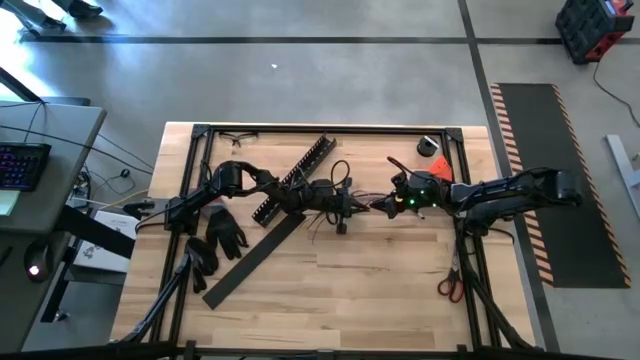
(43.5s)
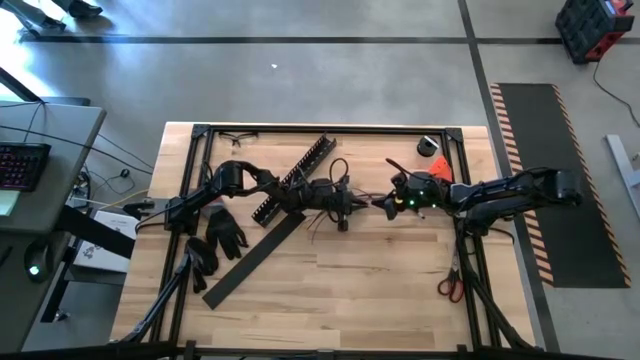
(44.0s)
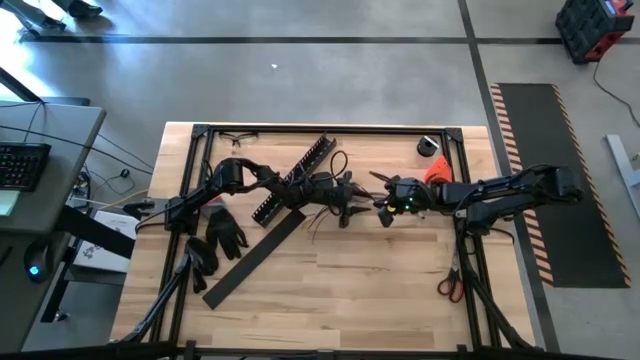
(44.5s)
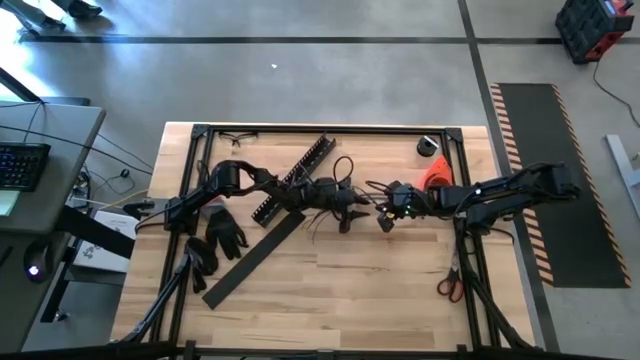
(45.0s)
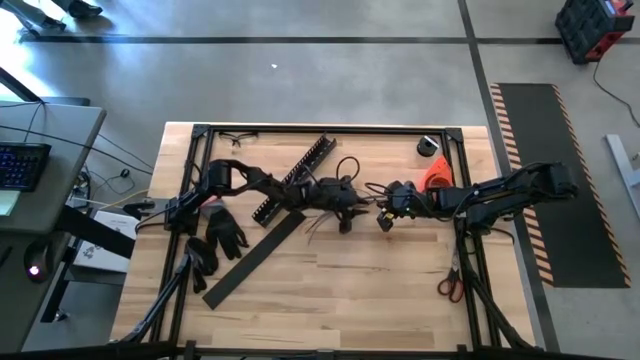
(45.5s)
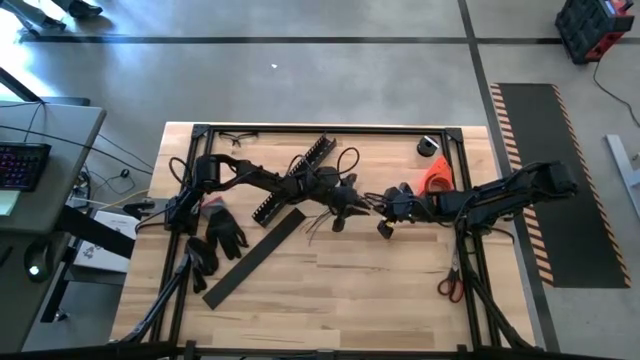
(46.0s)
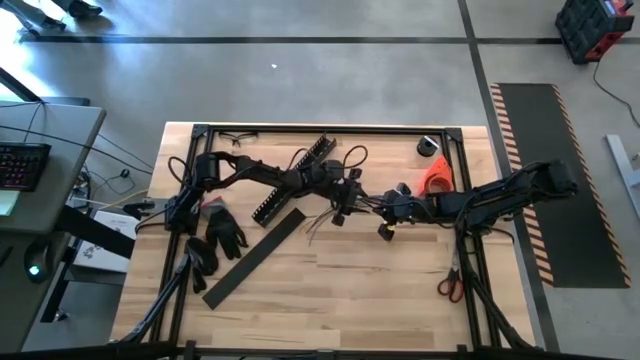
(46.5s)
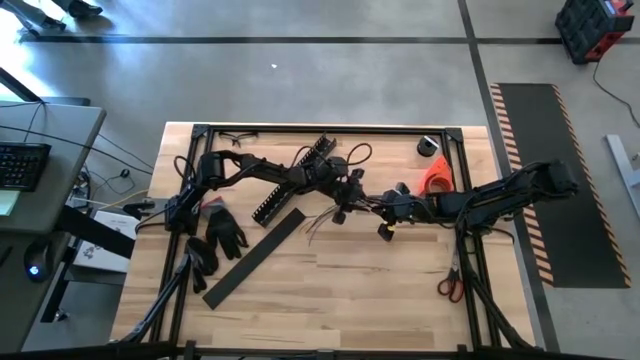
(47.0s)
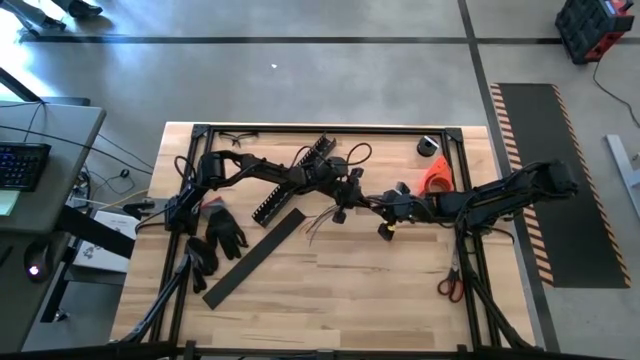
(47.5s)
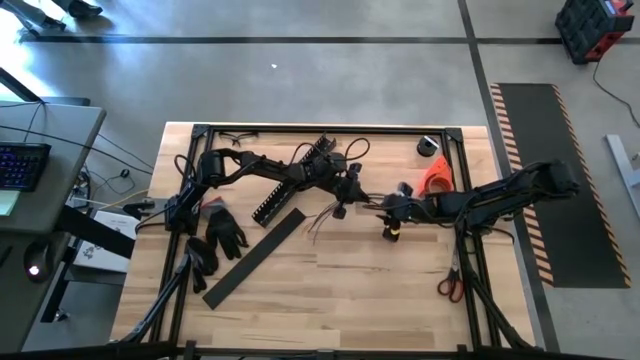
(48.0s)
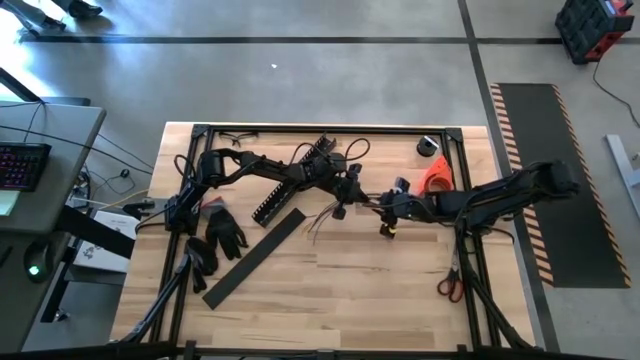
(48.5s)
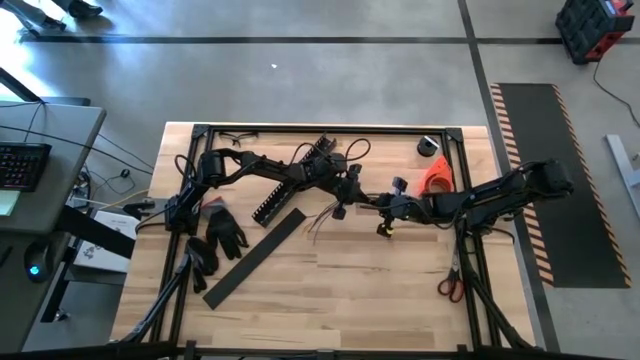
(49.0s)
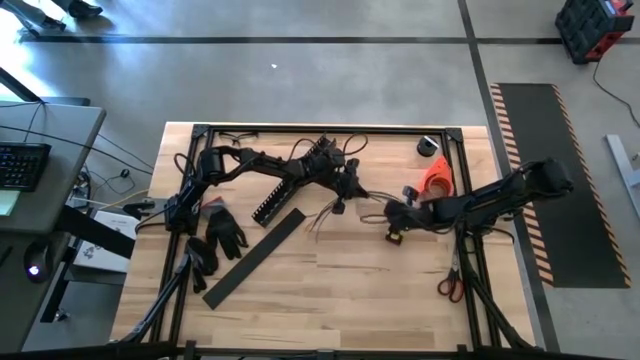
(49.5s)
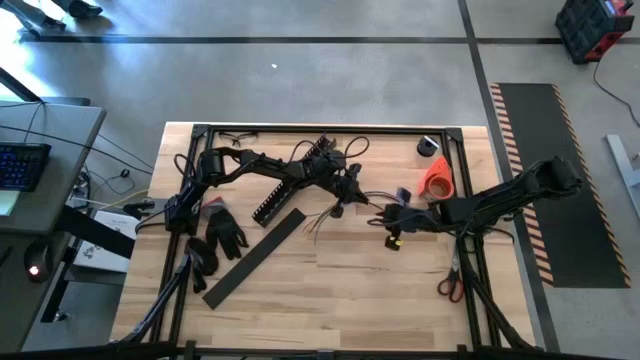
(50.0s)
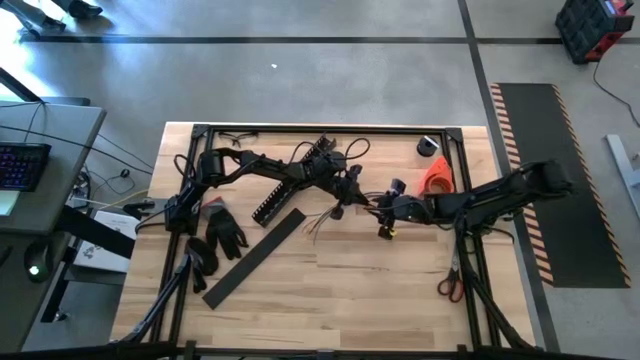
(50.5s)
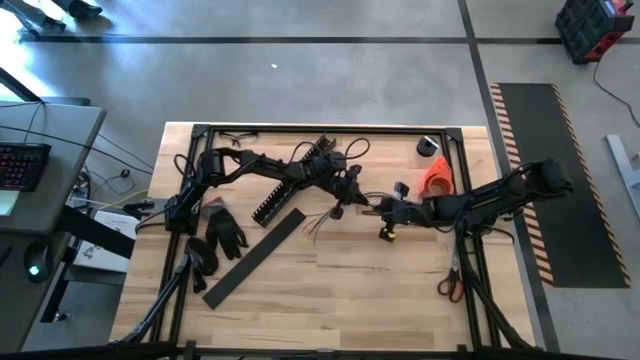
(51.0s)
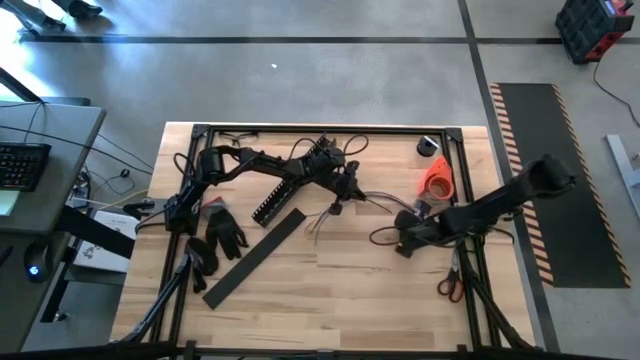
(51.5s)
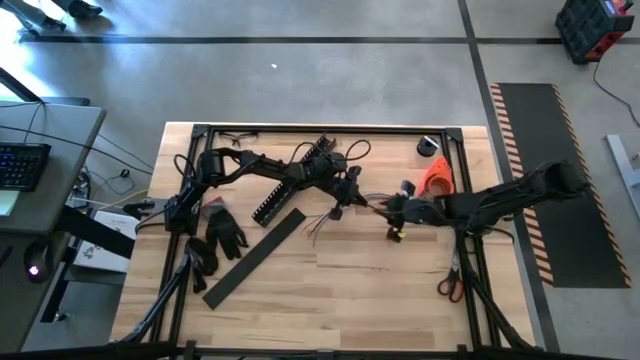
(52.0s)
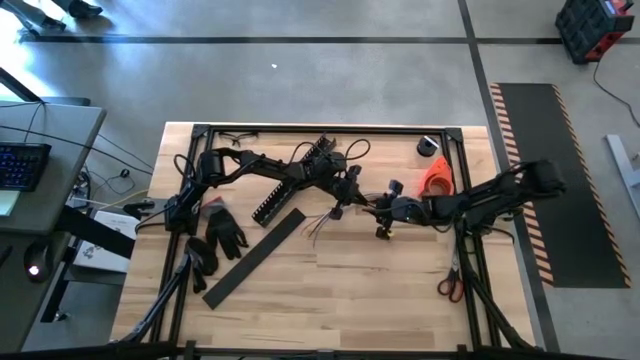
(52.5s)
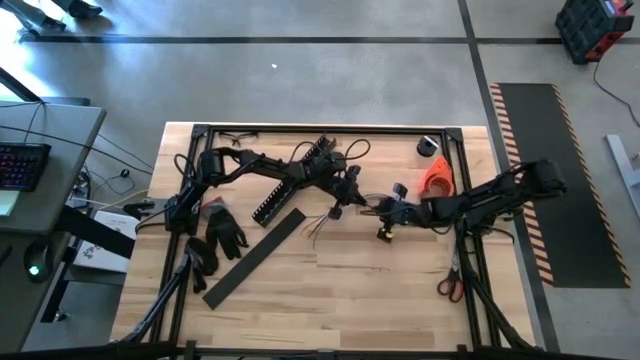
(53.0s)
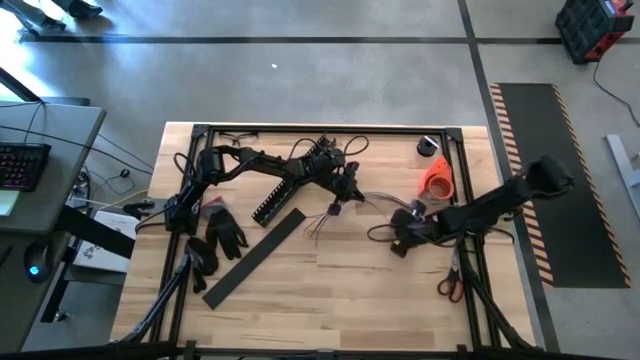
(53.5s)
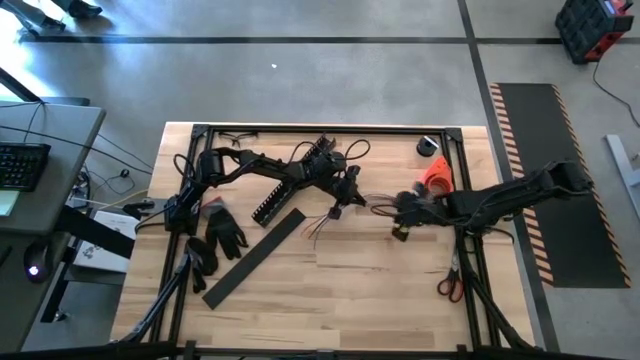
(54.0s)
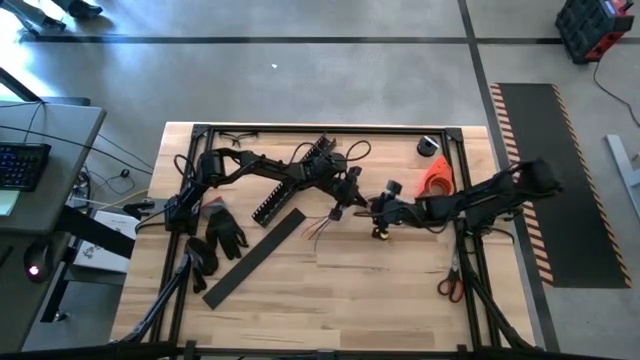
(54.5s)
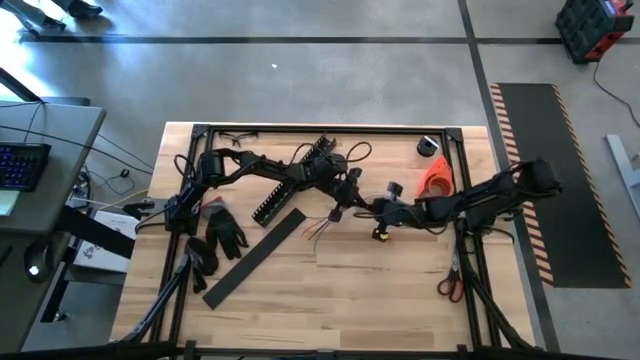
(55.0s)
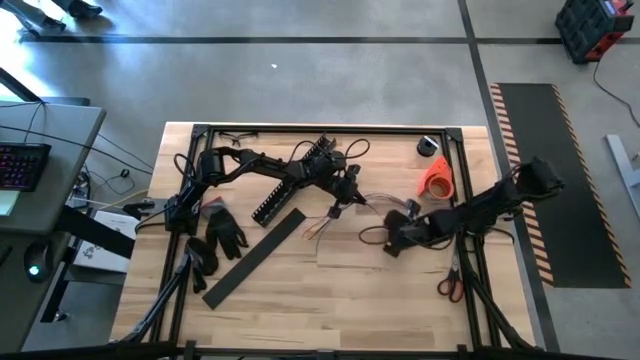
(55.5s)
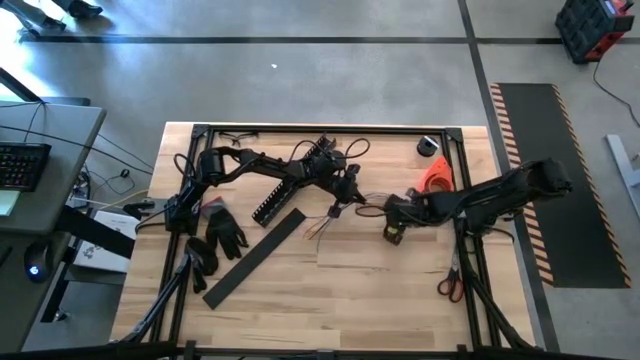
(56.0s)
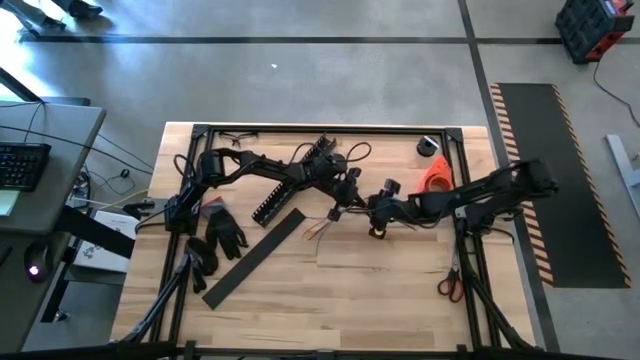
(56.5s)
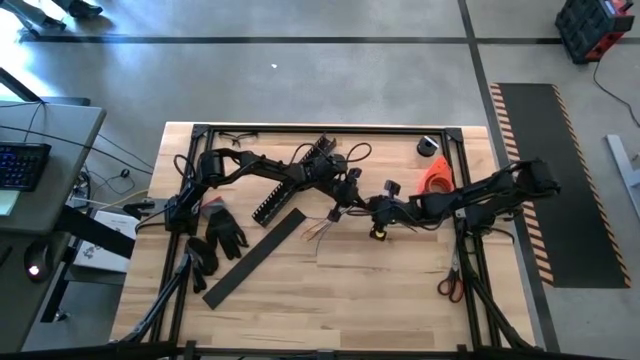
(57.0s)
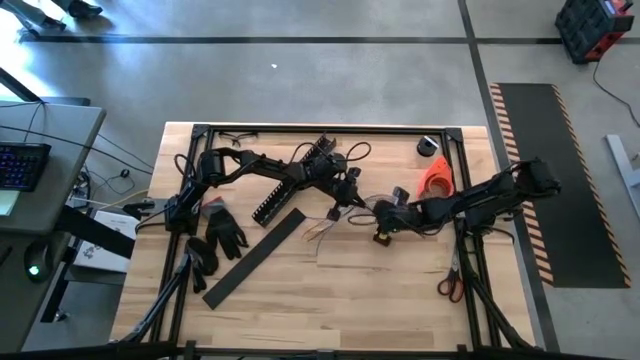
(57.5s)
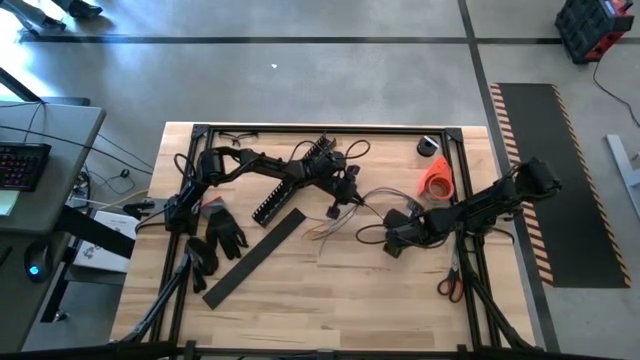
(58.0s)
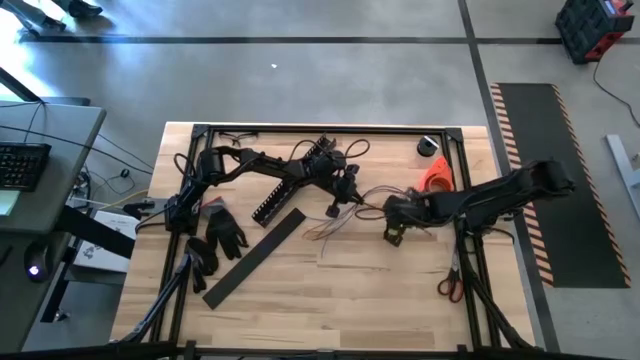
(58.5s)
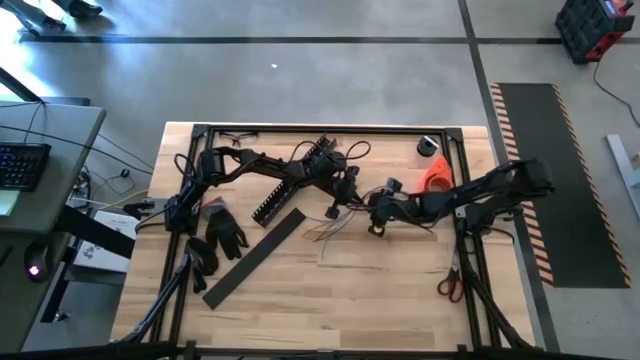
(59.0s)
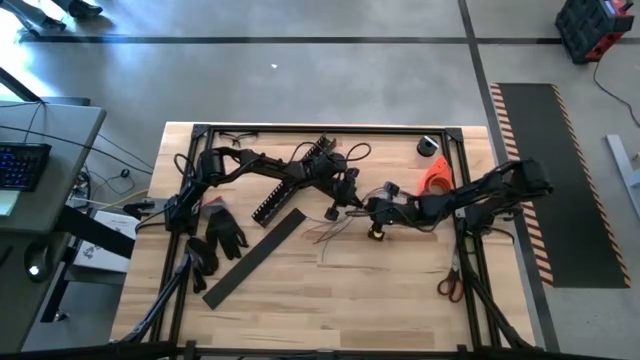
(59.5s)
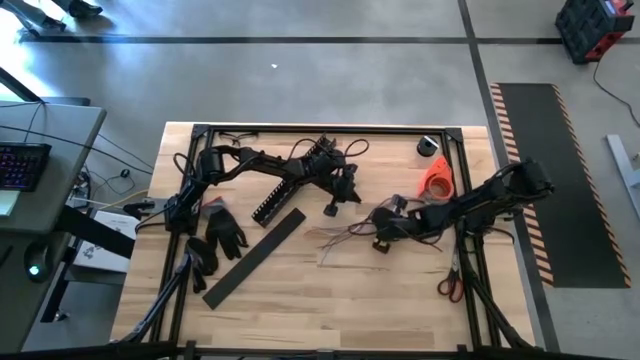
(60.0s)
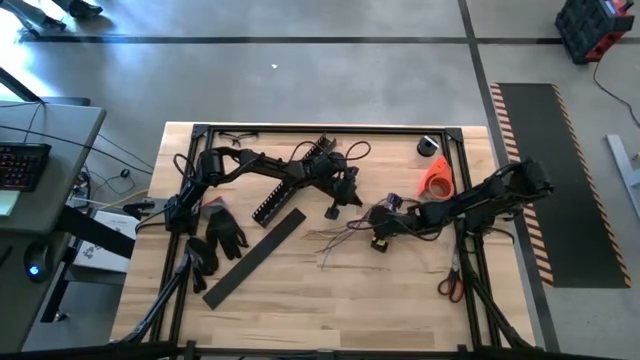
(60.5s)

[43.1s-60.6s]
Task: Ziptie cables
Wrap the cables together using the black zip tie

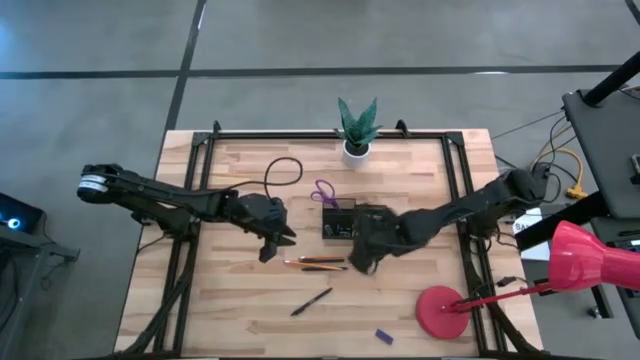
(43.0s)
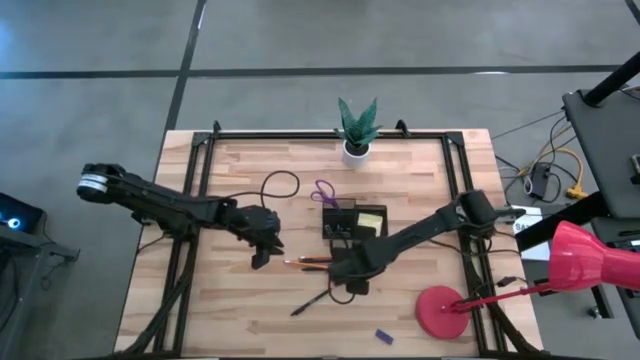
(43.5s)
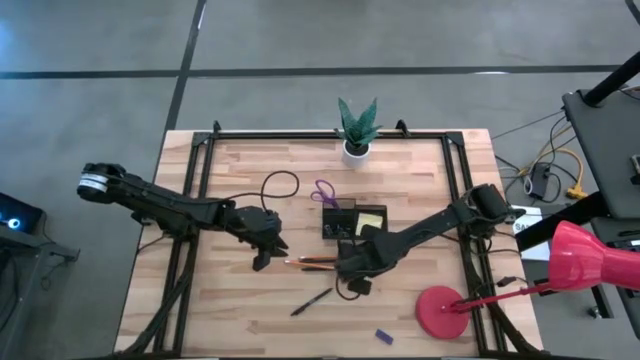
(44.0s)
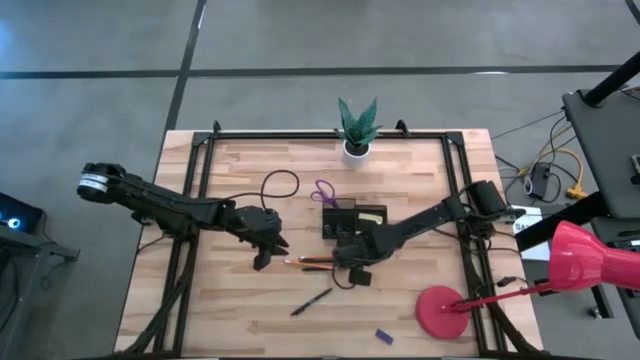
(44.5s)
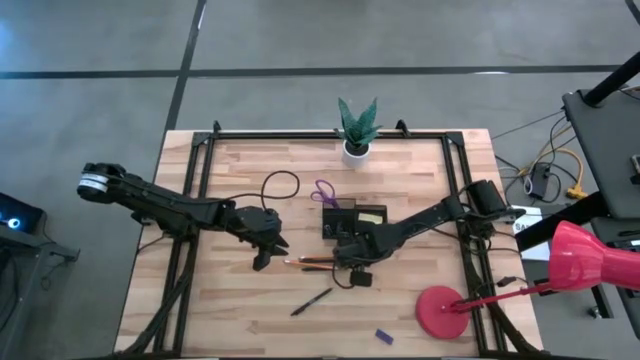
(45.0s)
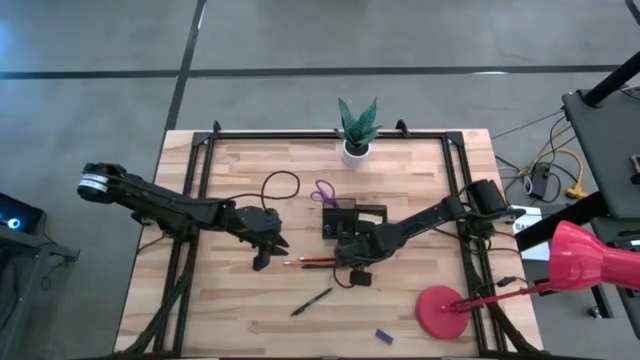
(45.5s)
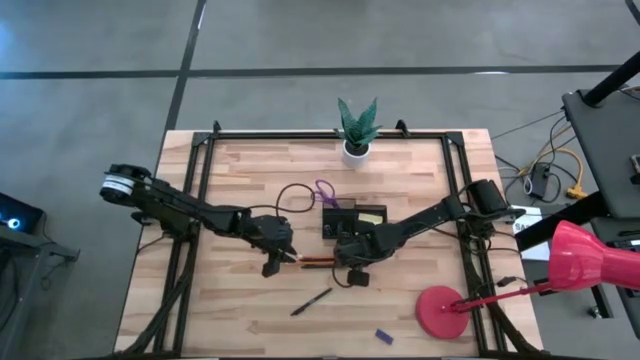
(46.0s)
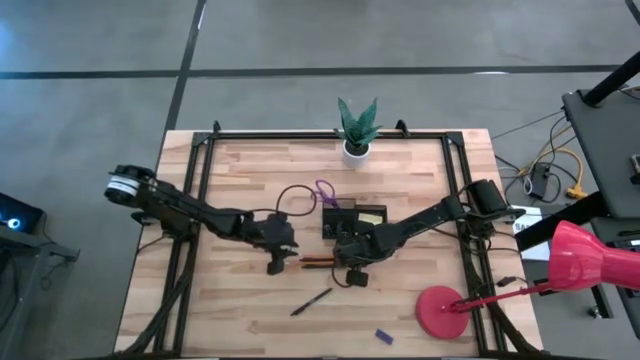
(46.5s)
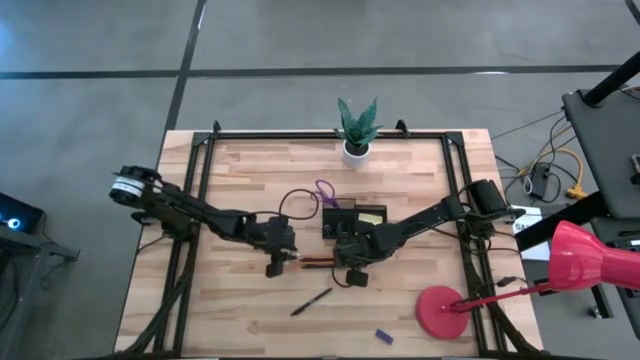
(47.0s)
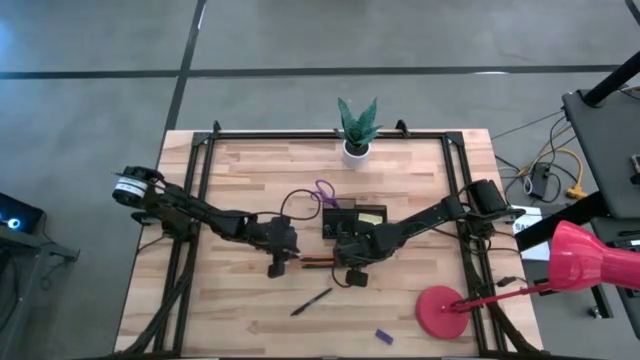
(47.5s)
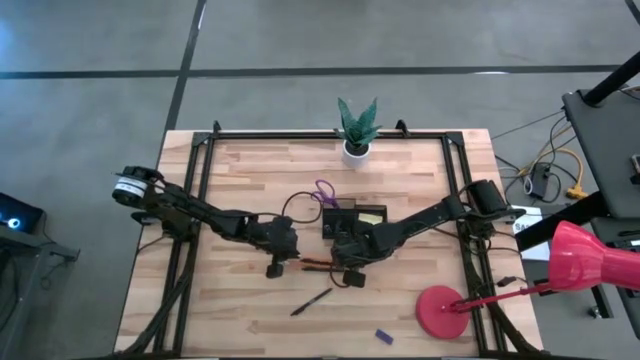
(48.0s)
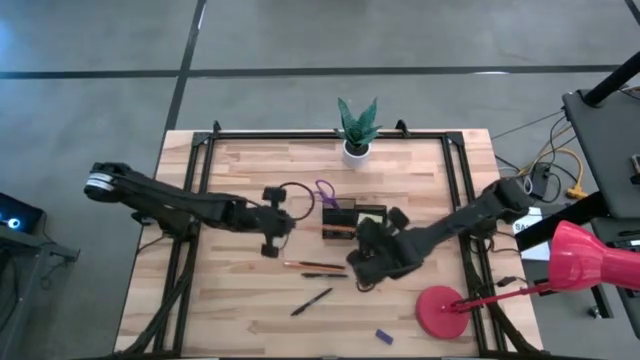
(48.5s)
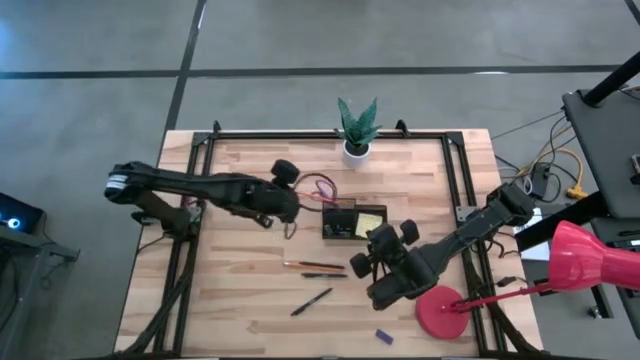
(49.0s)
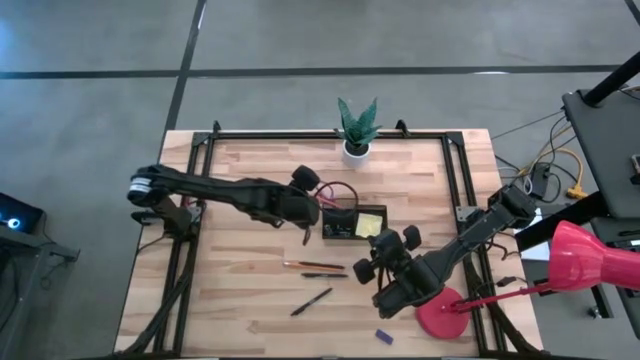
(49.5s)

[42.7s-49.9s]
Task: Pick and place office supplies into organizer
Put the top orange pencil into the black organizer
